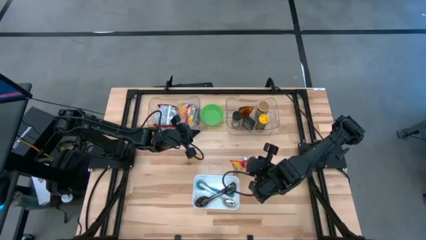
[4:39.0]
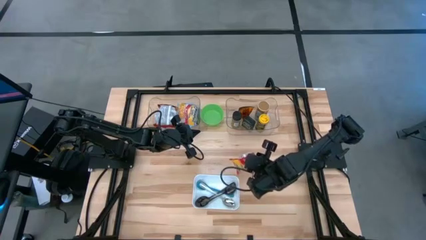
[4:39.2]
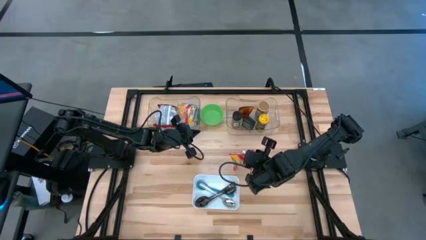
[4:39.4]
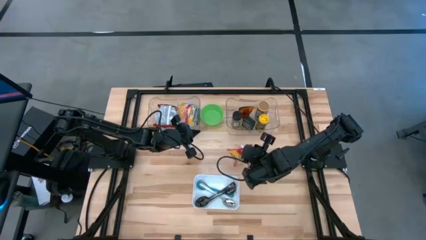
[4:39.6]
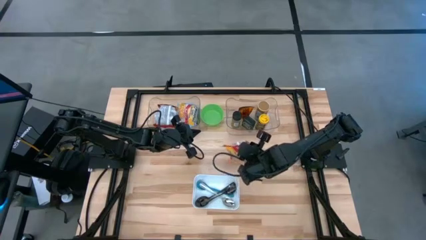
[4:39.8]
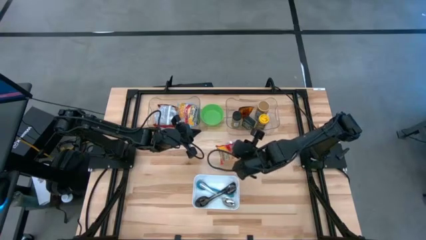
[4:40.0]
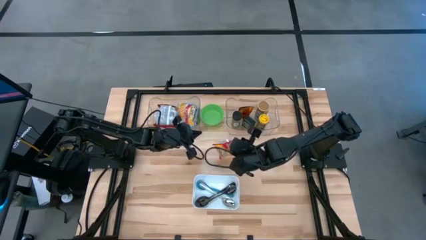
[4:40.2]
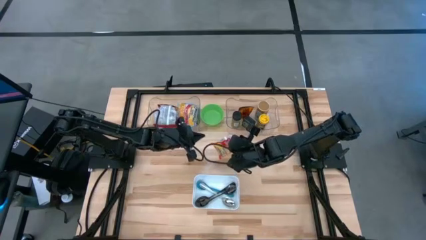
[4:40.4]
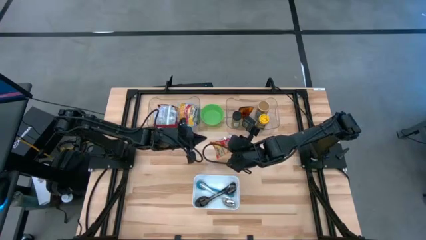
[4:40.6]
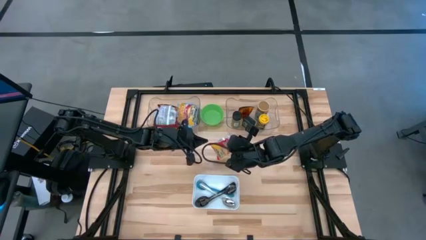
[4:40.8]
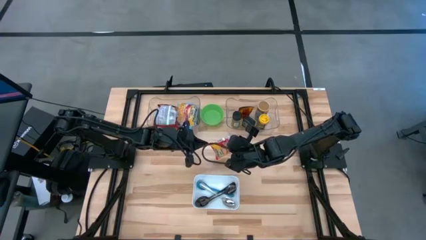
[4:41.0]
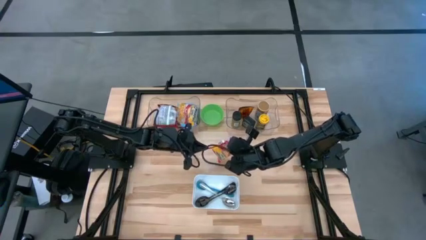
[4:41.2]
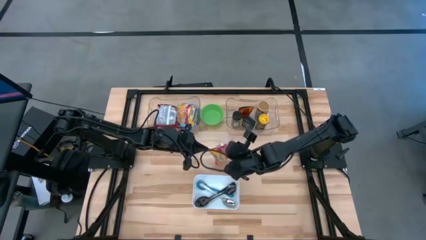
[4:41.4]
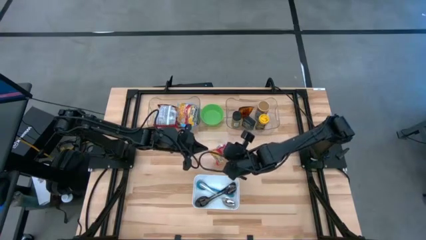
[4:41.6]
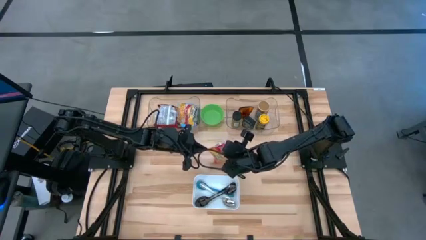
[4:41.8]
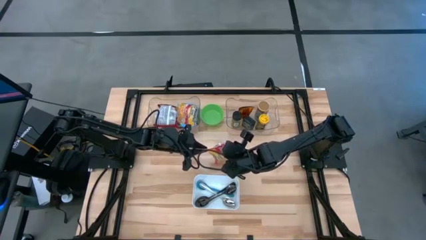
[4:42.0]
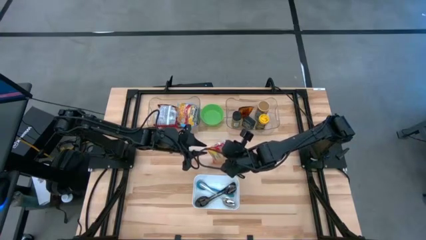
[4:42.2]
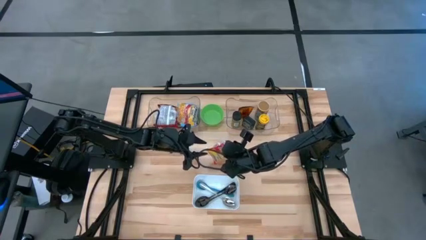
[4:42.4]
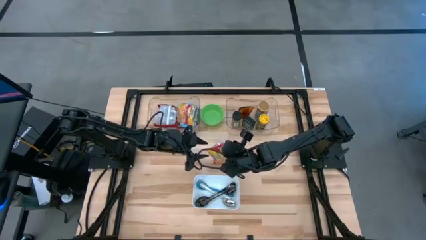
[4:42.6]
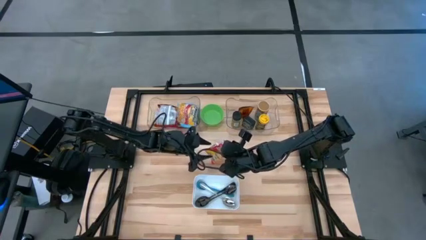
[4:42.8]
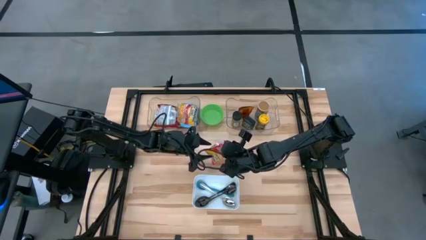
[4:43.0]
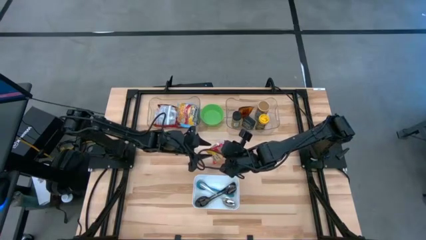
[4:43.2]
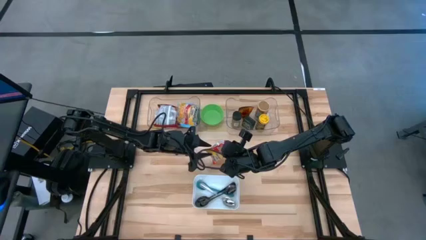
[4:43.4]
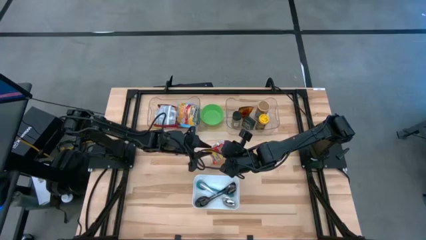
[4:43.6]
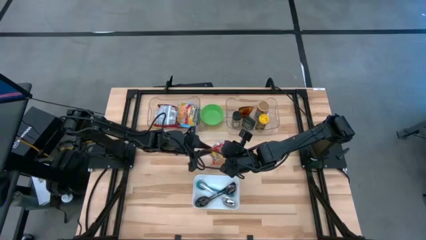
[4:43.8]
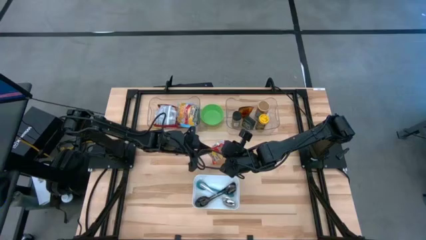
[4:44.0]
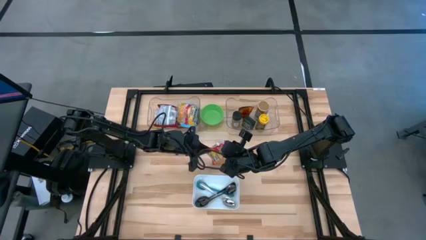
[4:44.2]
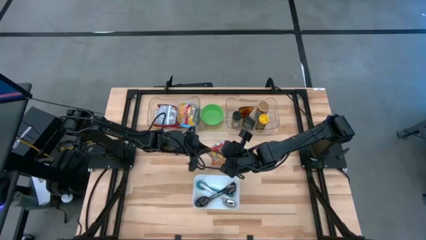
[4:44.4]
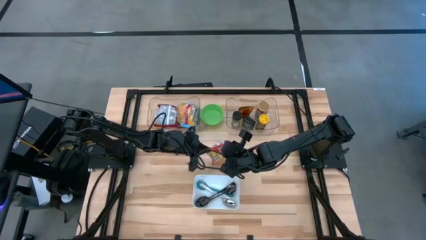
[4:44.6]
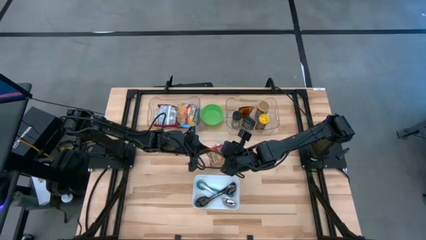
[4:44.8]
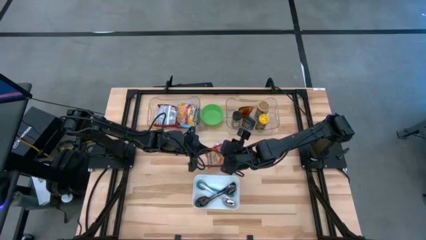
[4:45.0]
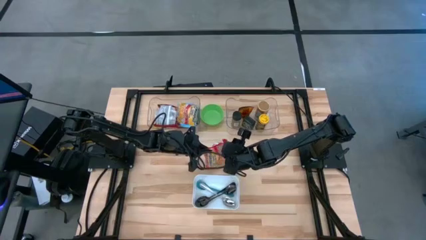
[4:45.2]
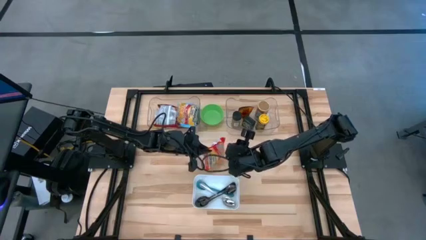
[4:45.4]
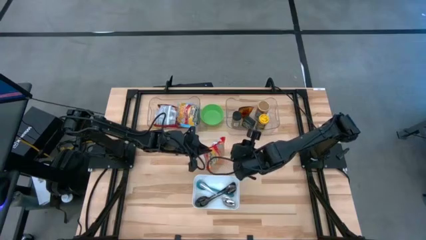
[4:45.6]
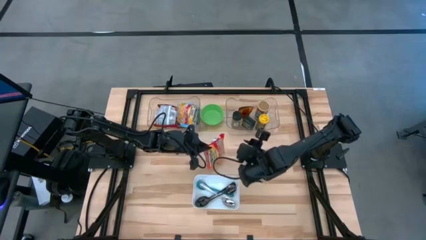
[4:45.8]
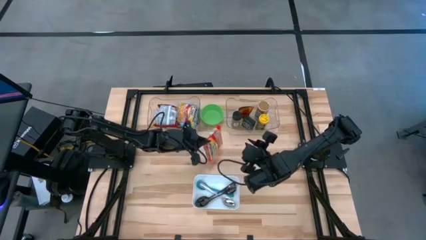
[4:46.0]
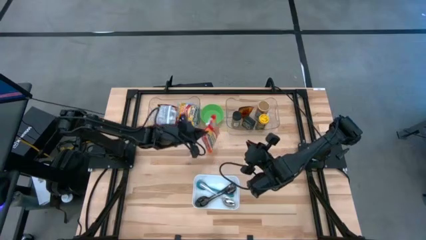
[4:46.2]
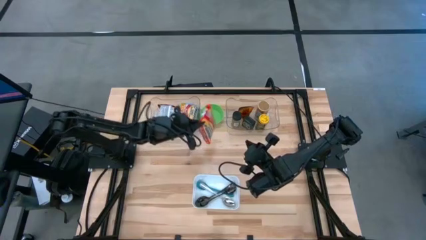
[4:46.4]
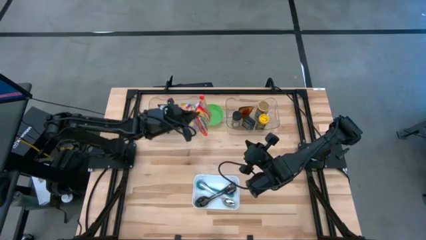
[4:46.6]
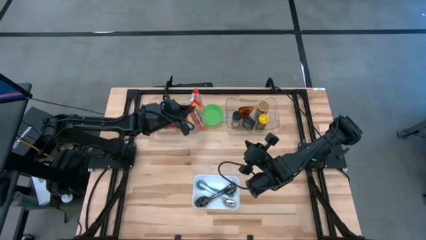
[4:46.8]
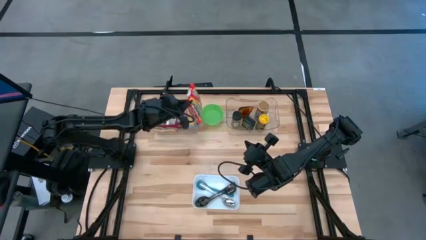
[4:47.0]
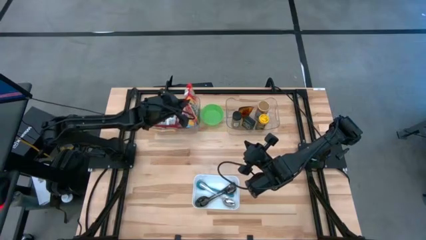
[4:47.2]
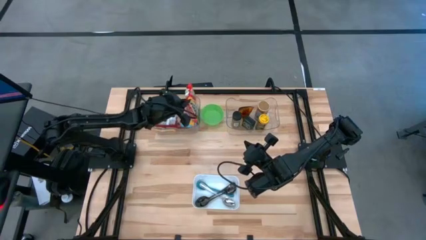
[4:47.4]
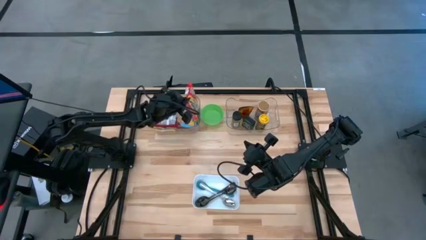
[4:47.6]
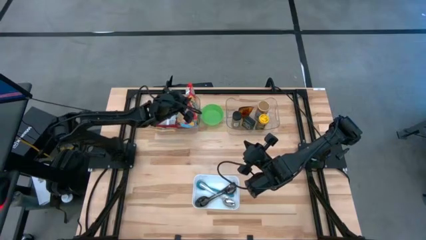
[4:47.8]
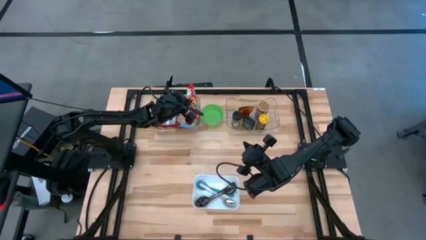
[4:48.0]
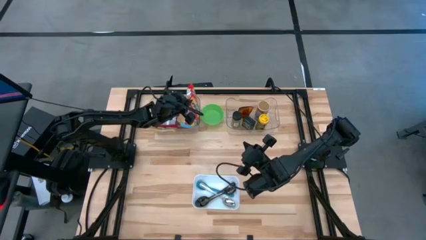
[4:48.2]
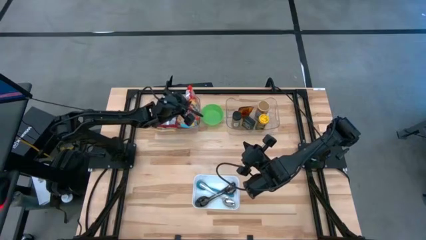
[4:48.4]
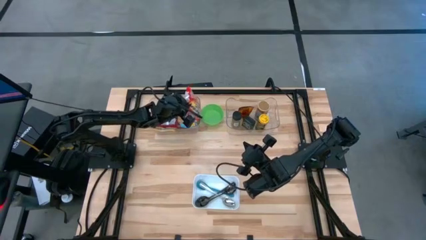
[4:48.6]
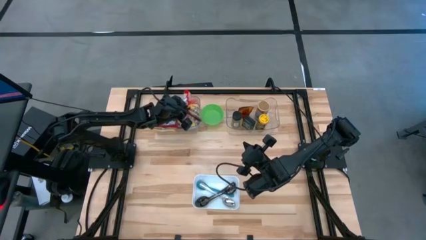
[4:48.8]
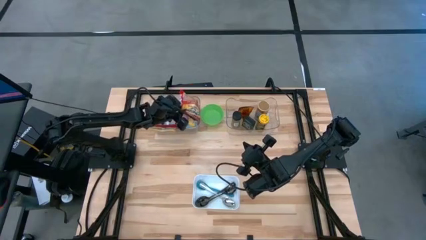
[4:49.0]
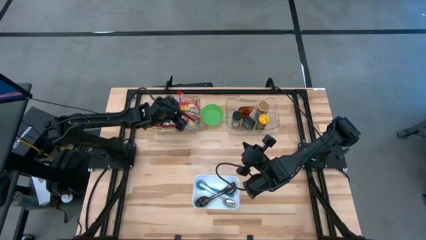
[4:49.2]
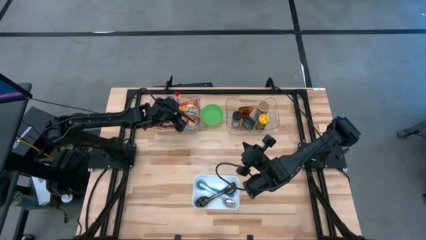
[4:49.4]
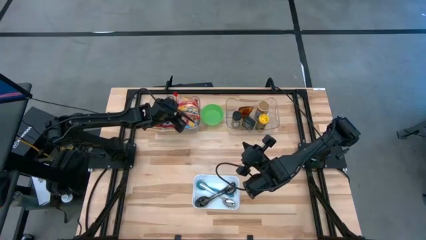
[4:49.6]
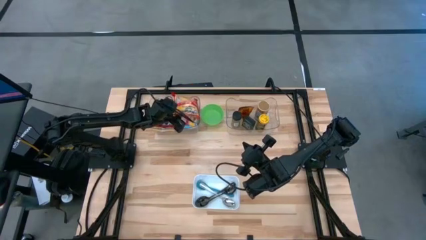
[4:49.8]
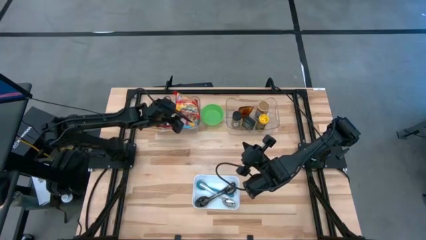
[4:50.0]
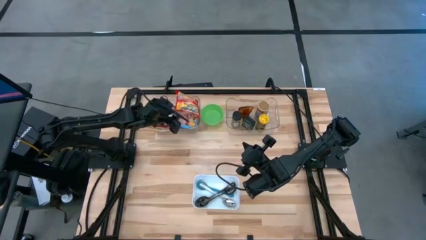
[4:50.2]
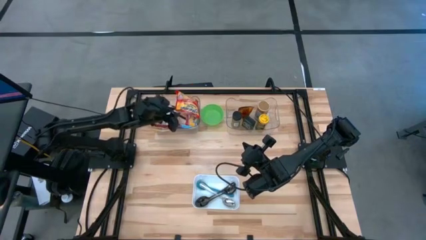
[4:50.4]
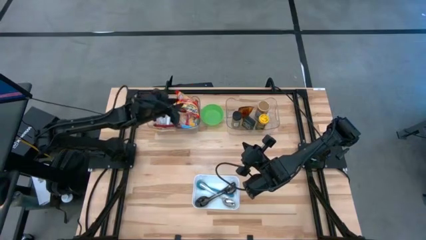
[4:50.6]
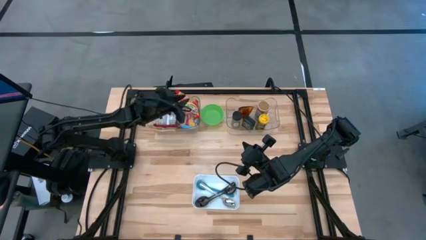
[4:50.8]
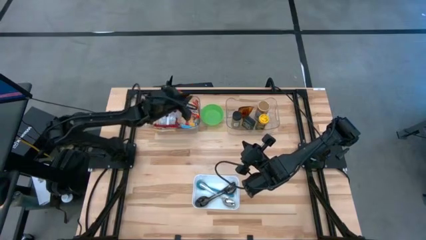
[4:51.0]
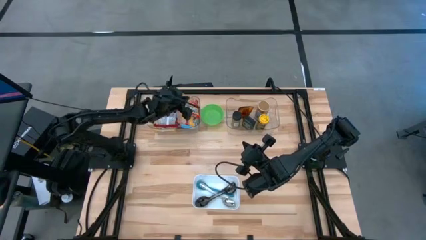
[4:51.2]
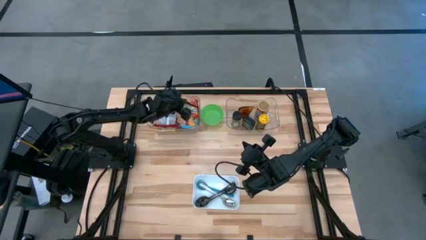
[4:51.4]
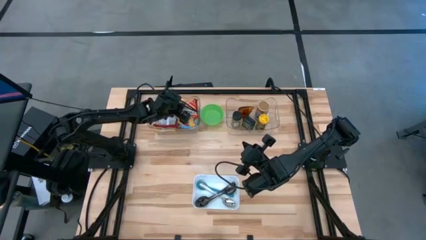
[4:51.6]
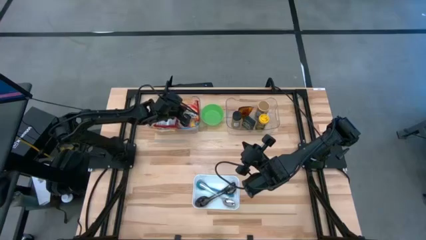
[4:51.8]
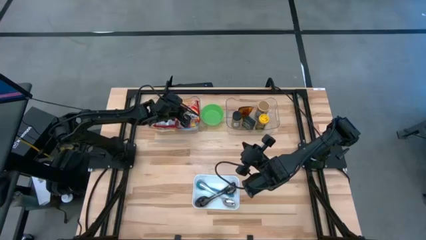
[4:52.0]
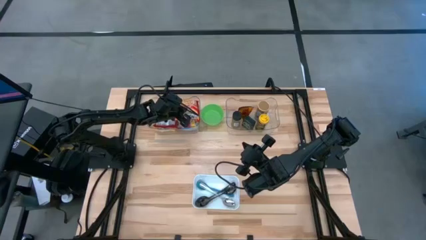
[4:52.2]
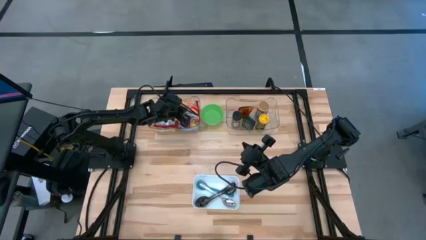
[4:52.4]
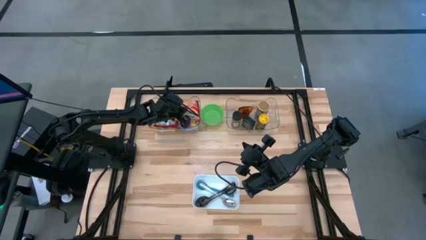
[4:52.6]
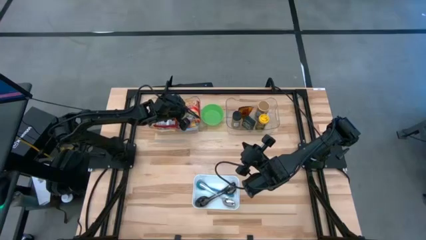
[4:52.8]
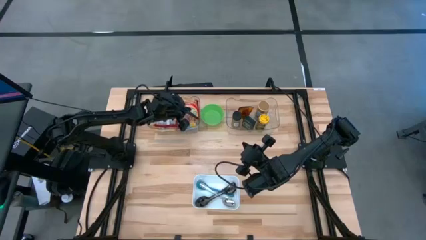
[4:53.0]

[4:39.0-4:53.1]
Task: Pick & Place Food Item
Put the orange noodle pack into the left transparent bin
